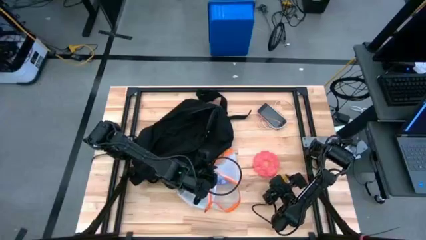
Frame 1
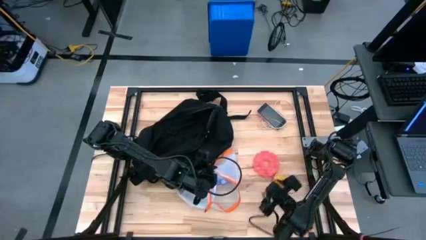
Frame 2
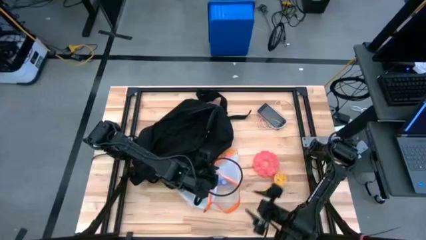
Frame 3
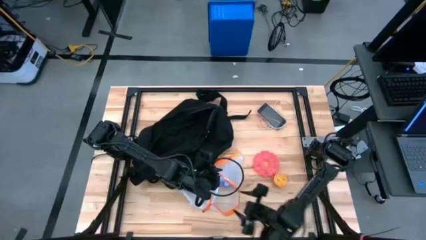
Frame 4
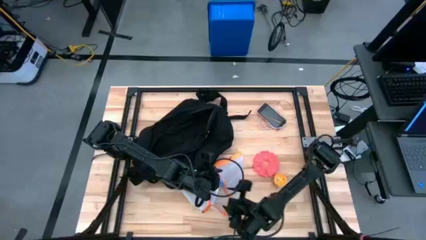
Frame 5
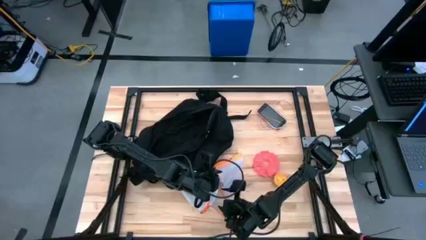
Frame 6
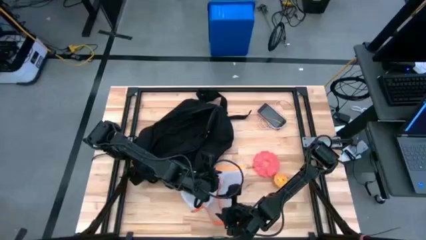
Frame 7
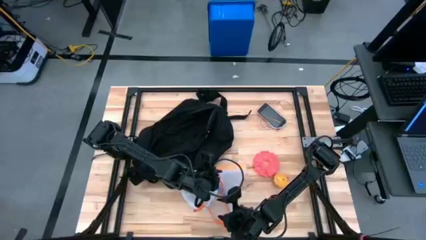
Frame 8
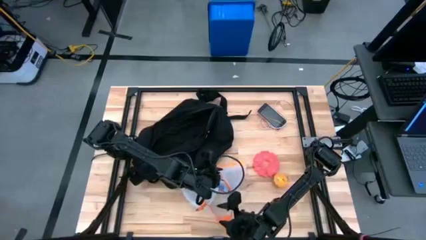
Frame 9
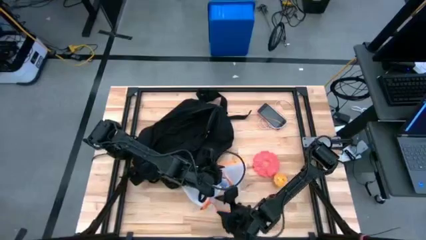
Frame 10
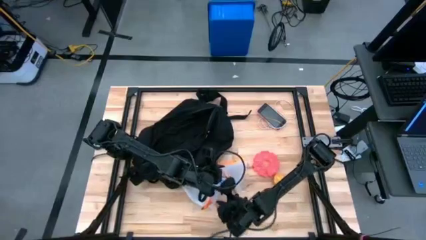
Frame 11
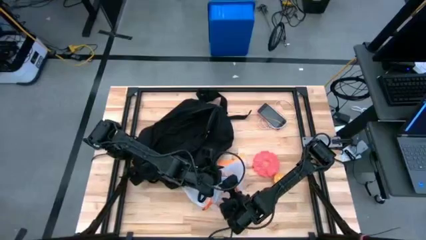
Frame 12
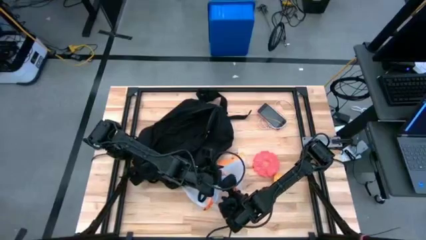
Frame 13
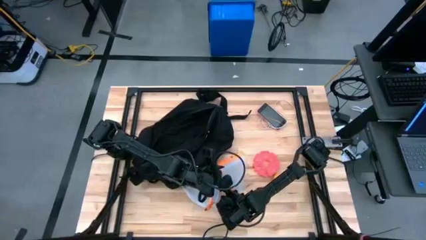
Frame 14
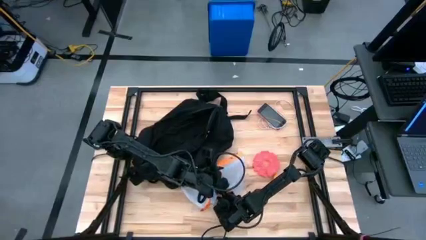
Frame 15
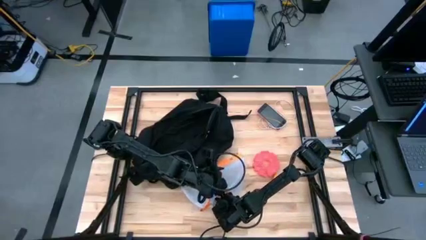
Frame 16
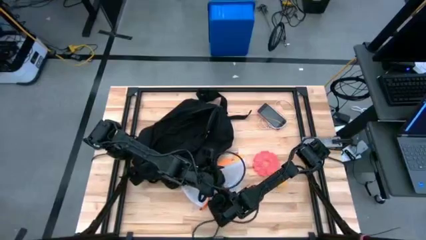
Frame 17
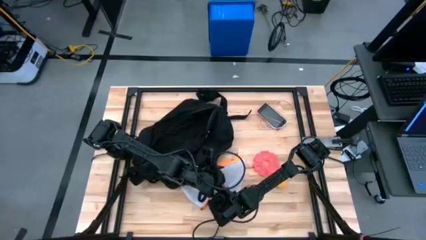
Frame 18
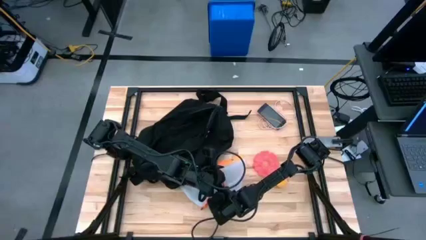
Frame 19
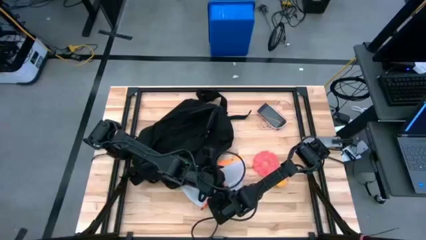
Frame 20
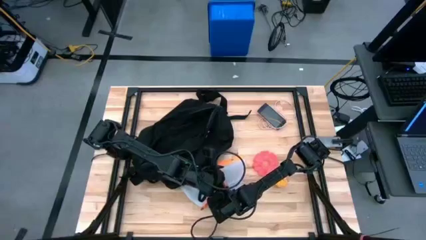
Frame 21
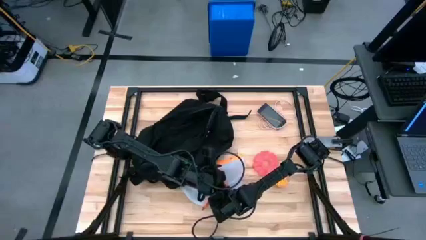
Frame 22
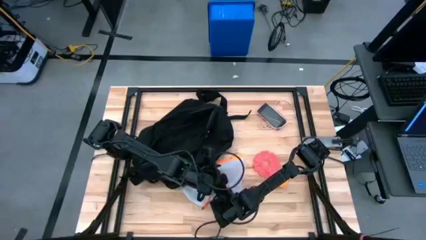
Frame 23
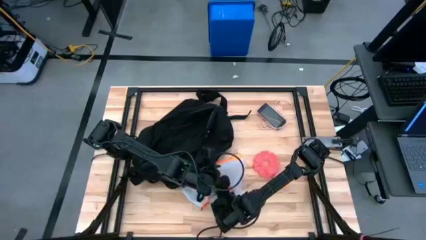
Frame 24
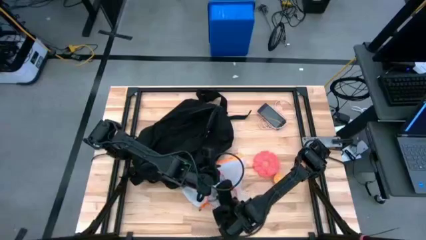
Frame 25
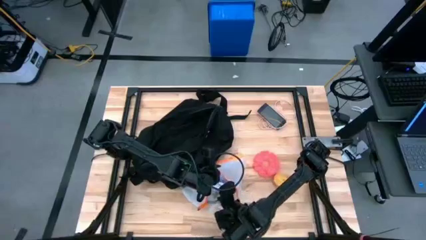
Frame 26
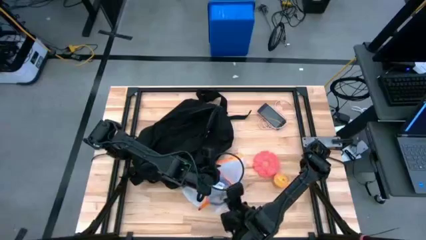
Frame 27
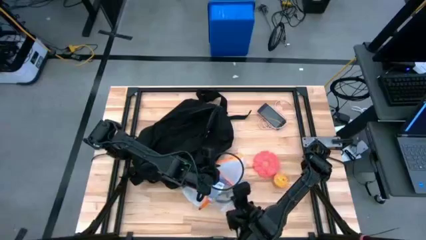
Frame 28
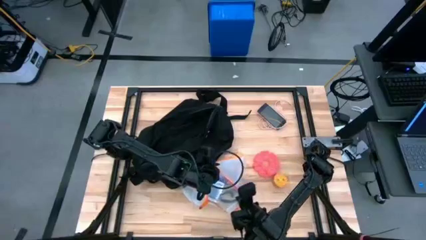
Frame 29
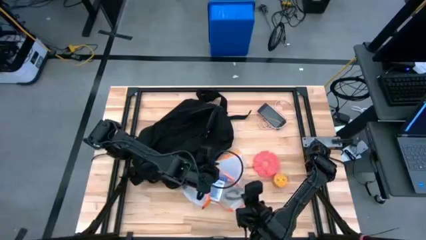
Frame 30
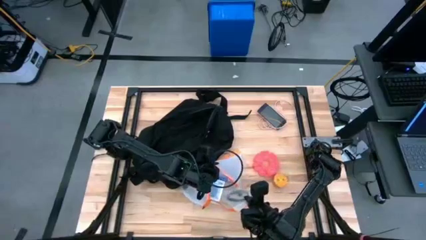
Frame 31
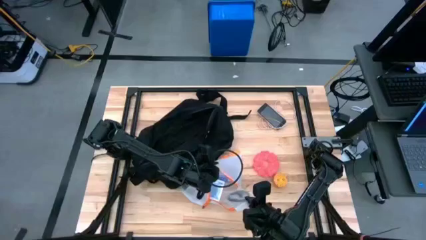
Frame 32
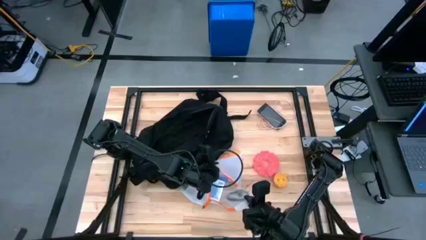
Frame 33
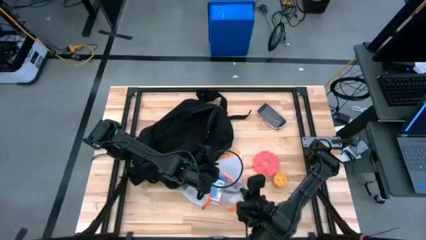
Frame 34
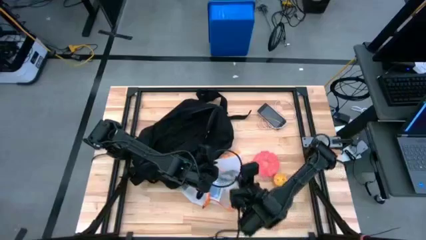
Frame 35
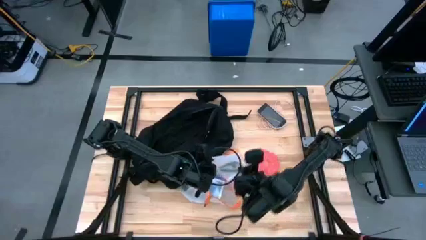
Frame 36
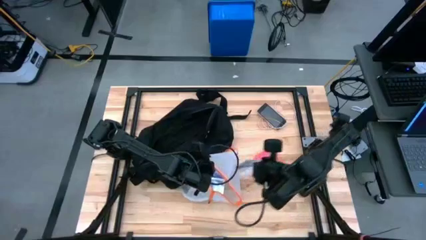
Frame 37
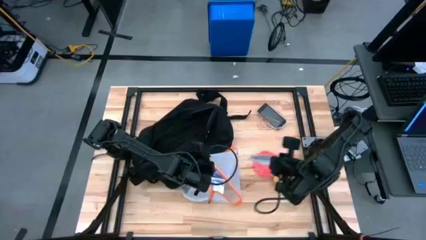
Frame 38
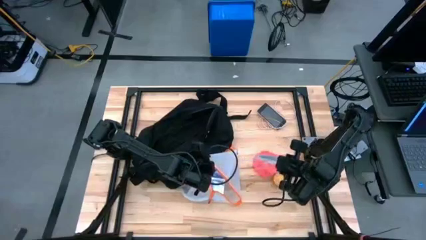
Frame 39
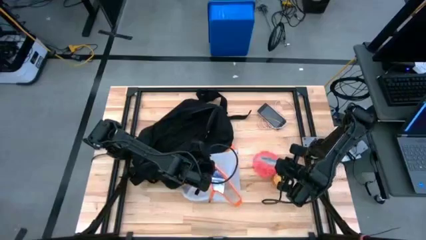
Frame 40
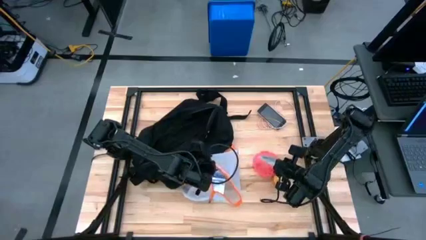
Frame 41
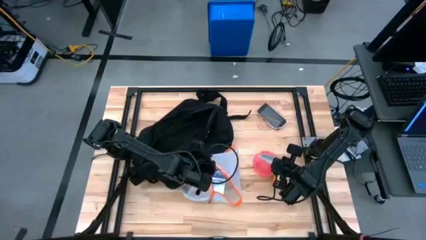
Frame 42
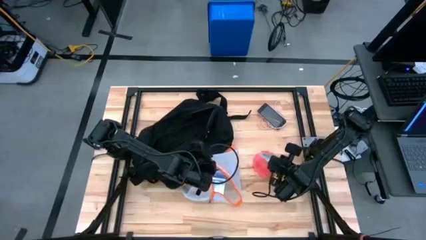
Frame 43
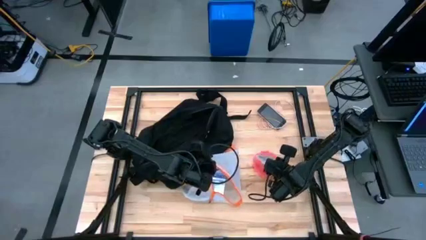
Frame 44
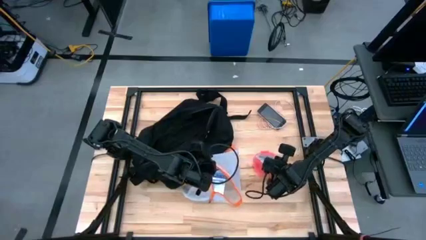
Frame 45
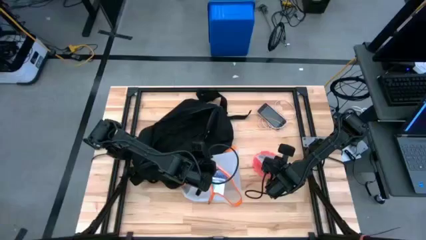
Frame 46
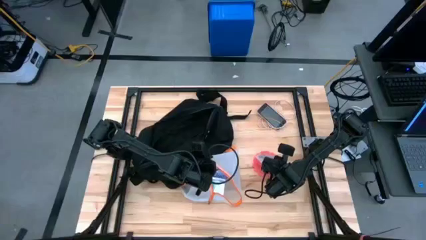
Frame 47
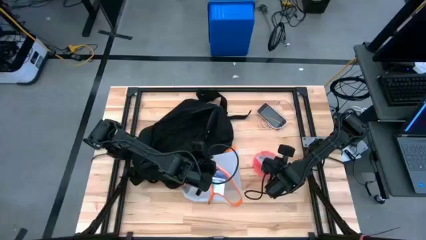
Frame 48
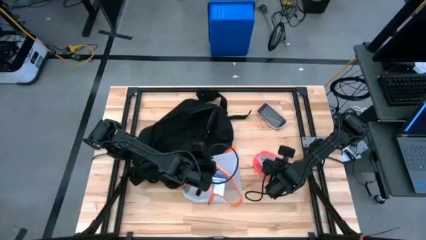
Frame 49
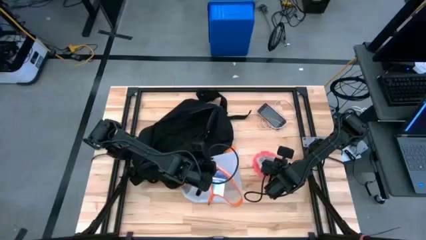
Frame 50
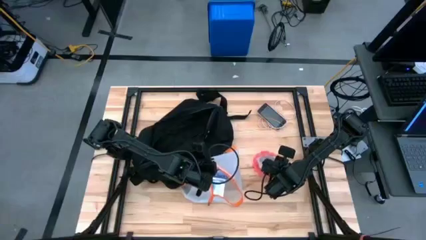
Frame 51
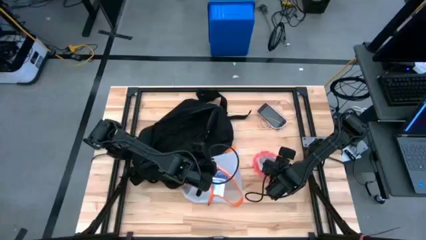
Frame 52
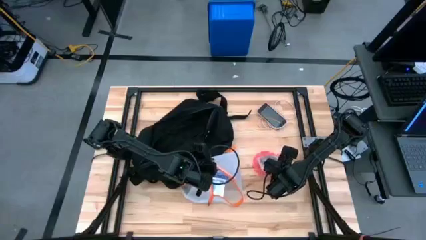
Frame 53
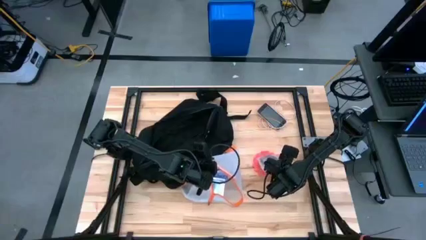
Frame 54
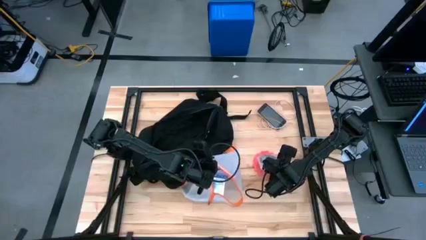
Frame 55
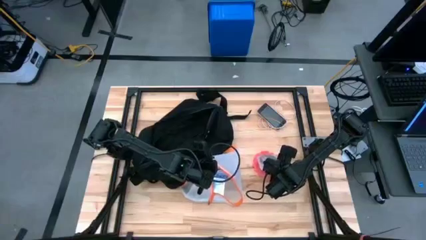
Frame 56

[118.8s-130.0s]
Task: Unpack backpack
Remove the black earphone from the orange zip bag

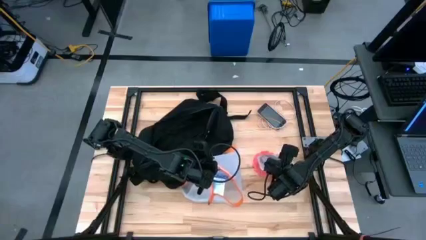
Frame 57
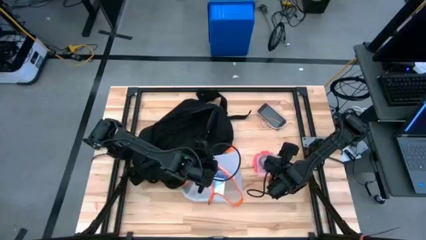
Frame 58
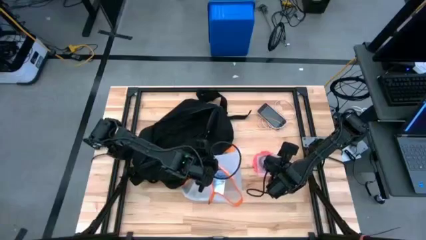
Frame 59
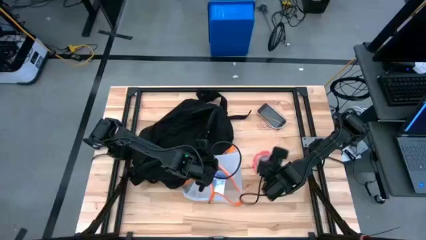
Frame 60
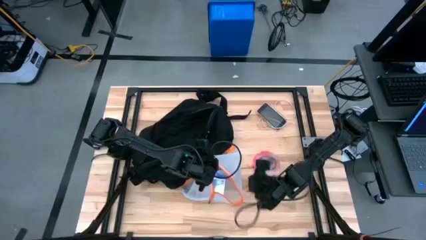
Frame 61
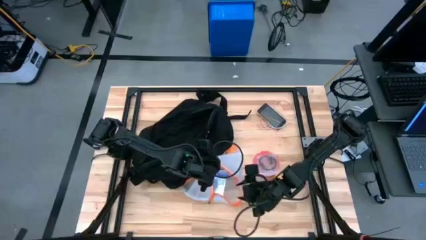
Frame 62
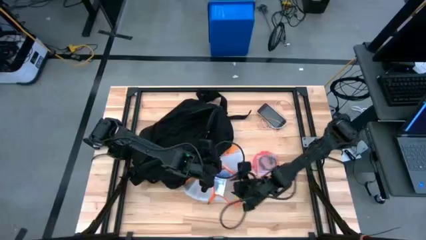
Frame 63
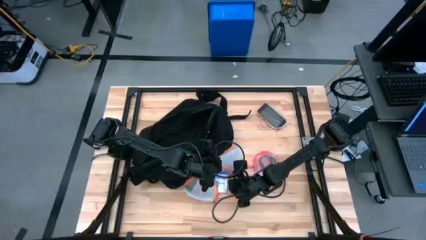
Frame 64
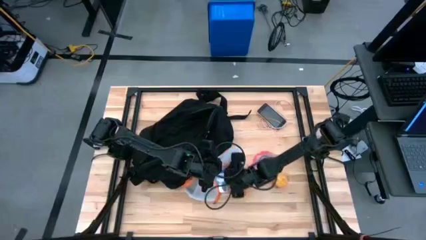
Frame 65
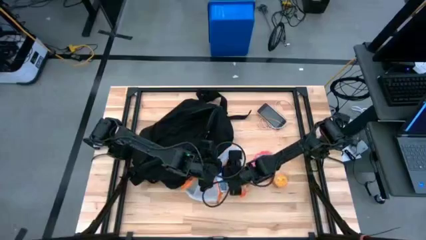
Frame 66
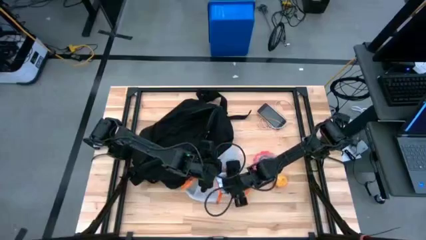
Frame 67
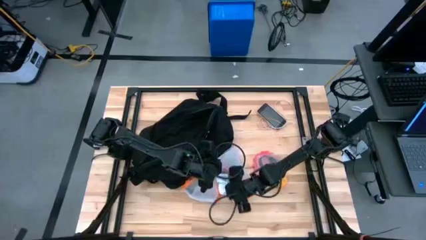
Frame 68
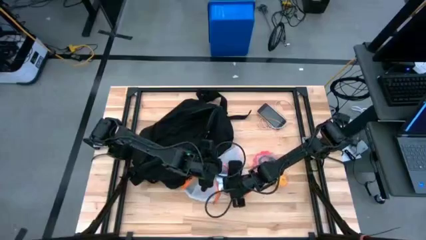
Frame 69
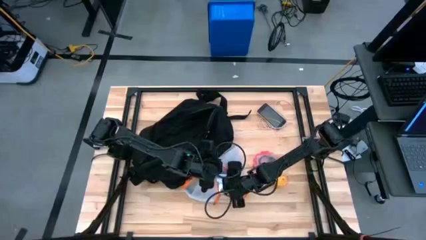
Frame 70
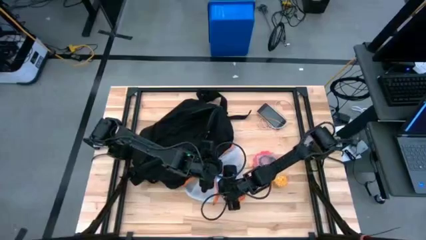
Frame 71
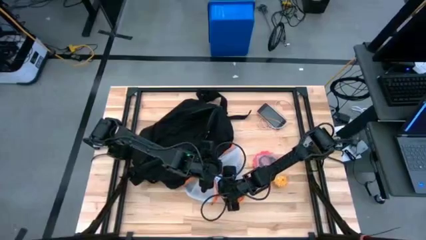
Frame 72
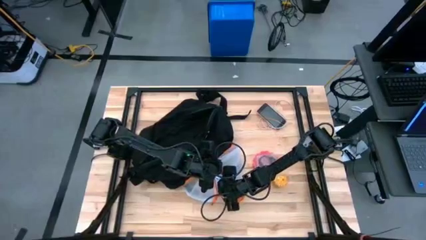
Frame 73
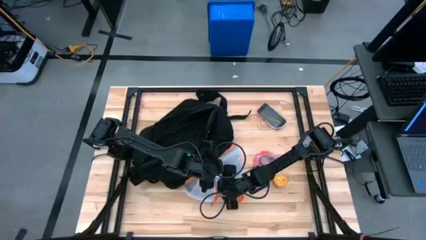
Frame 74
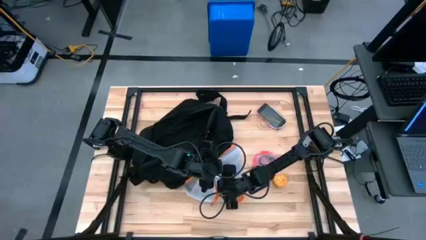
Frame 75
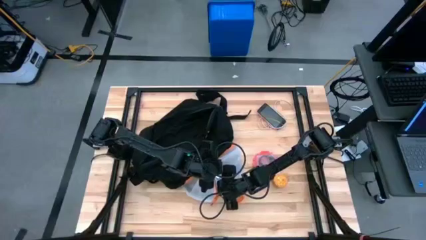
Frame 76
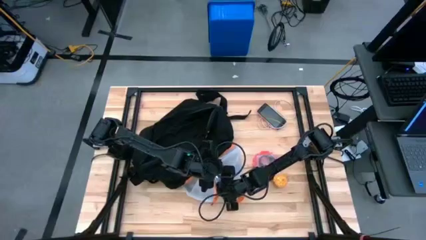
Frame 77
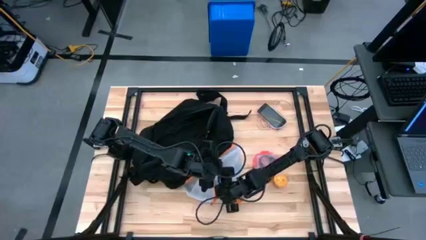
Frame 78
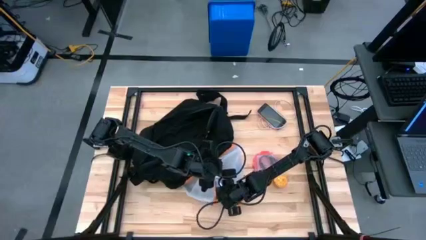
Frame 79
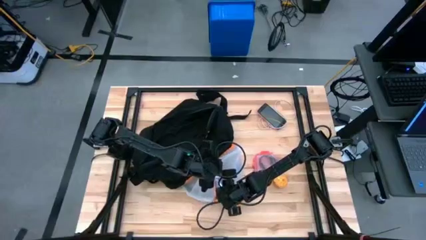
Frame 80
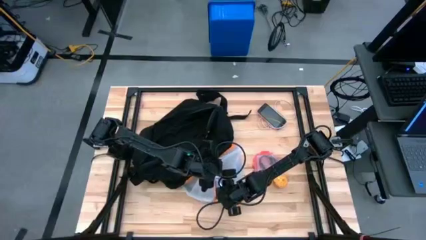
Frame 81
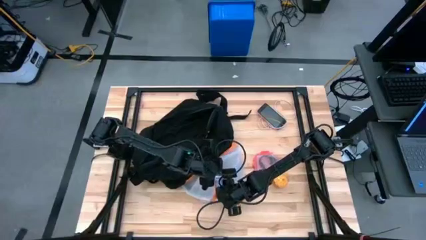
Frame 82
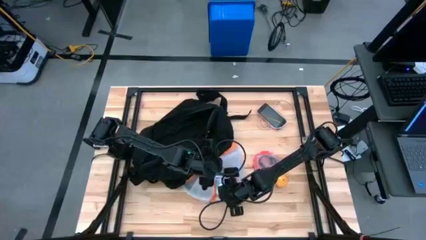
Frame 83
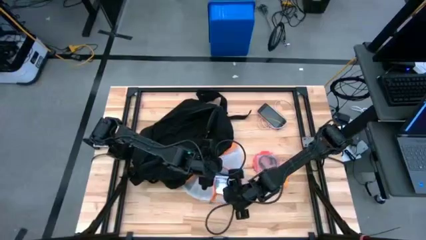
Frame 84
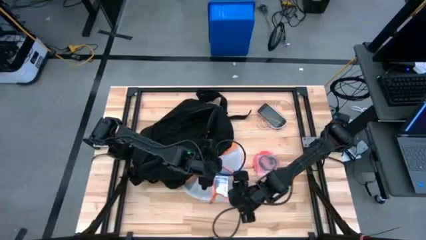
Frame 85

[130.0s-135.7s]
Remove the blue game card from the orange zip bag
